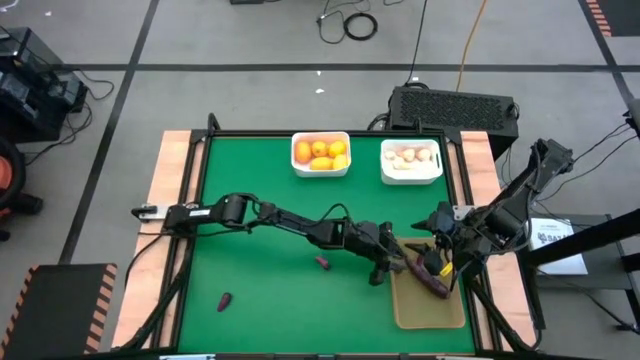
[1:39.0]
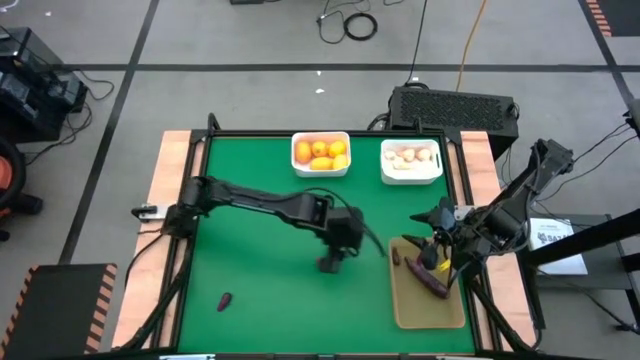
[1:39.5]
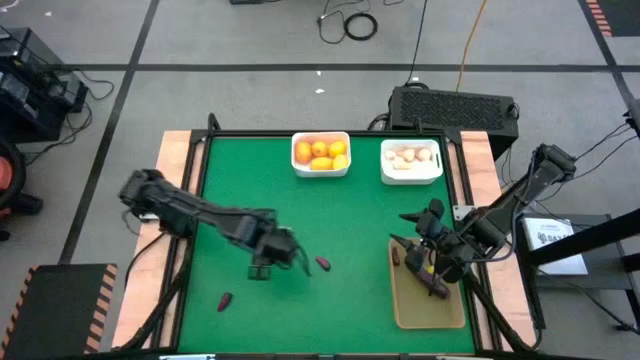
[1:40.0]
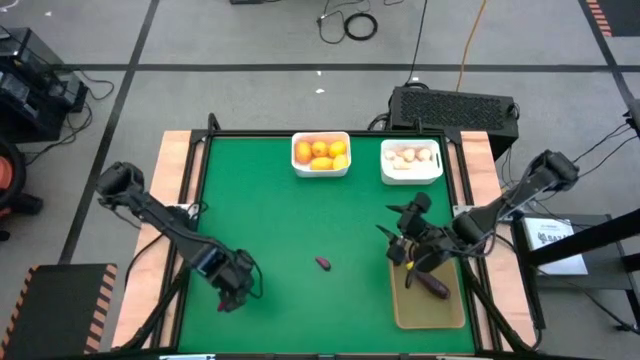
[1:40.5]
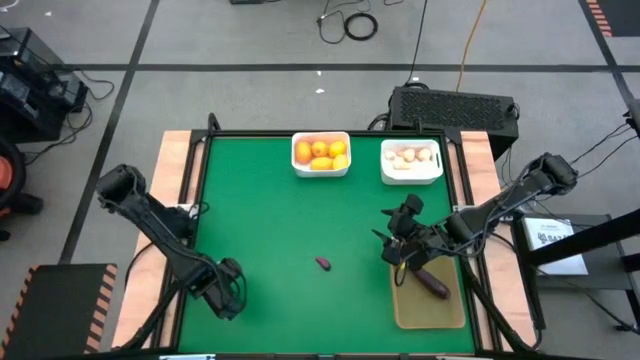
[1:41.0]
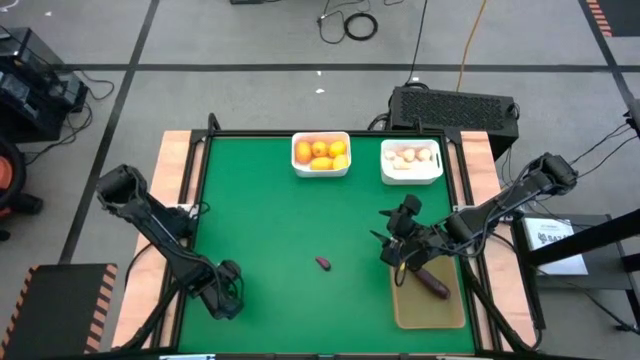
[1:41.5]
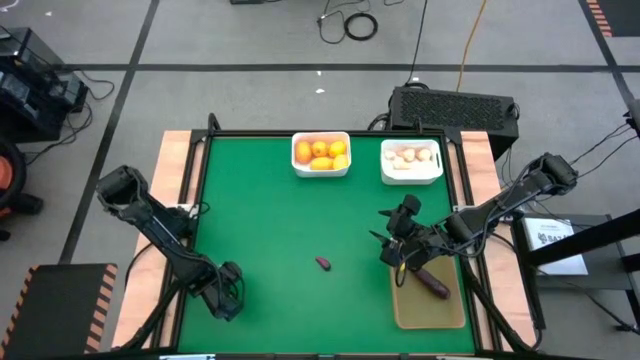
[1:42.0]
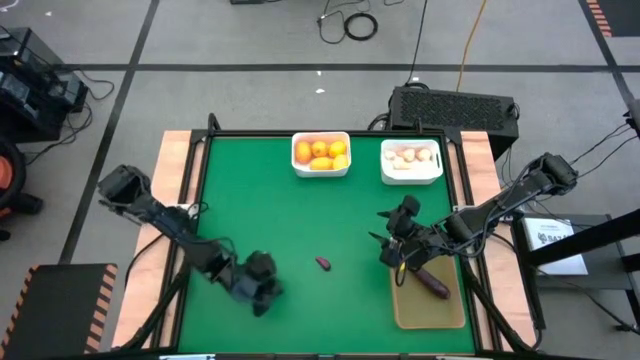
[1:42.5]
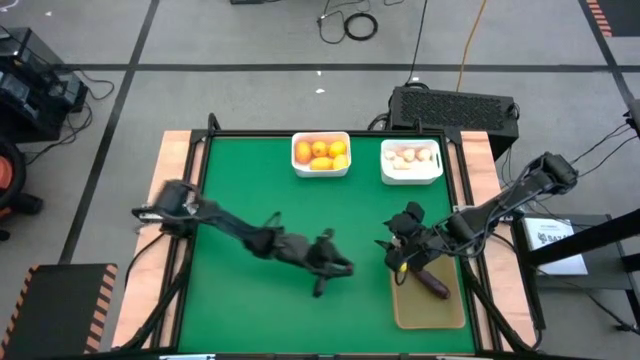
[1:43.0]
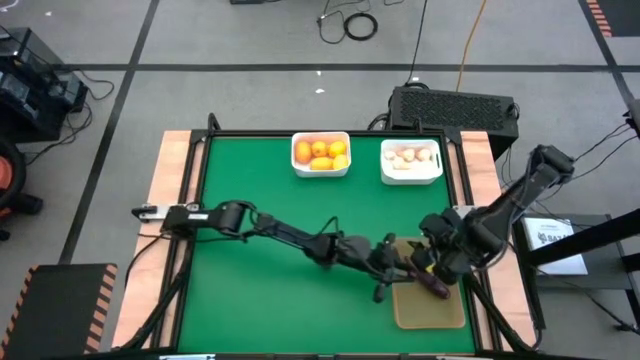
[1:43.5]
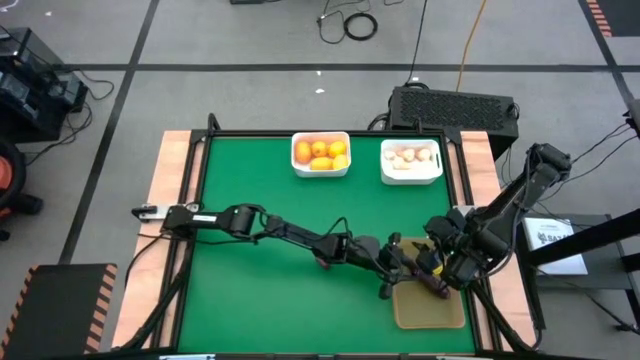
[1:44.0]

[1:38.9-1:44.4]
Task: Sort produce into baskets
Put the purple eggplant into the light orange bin

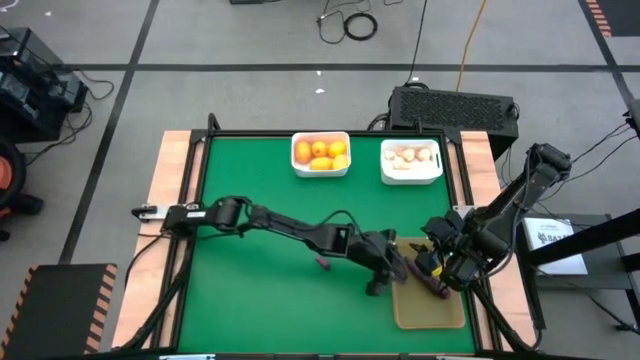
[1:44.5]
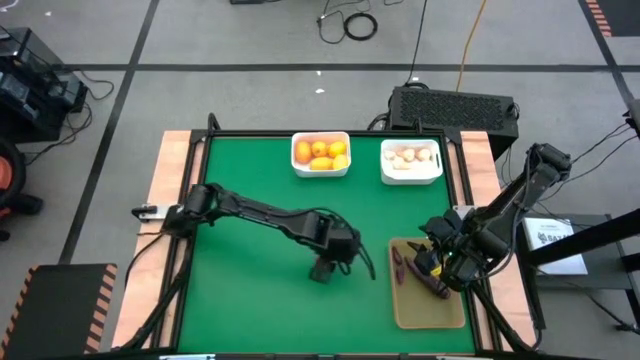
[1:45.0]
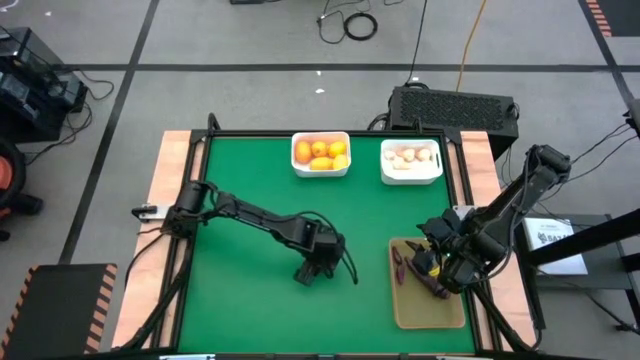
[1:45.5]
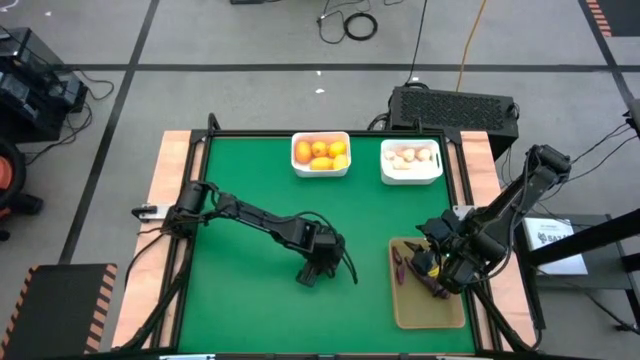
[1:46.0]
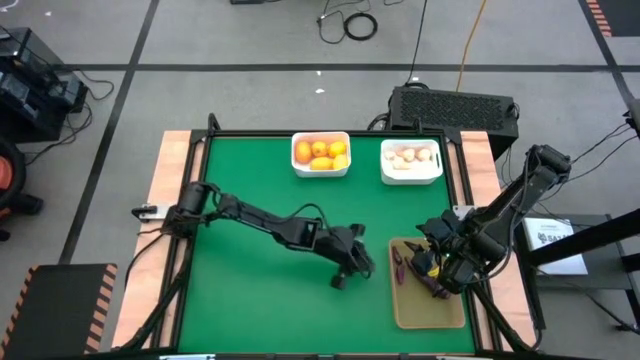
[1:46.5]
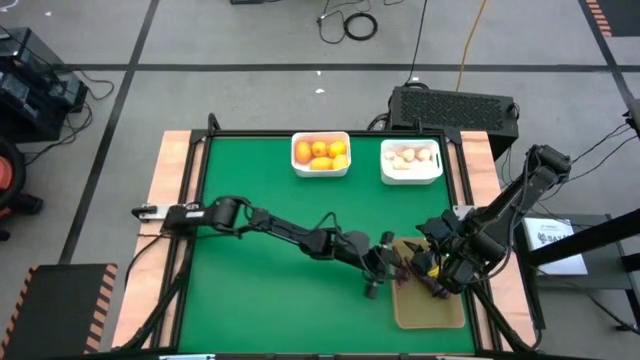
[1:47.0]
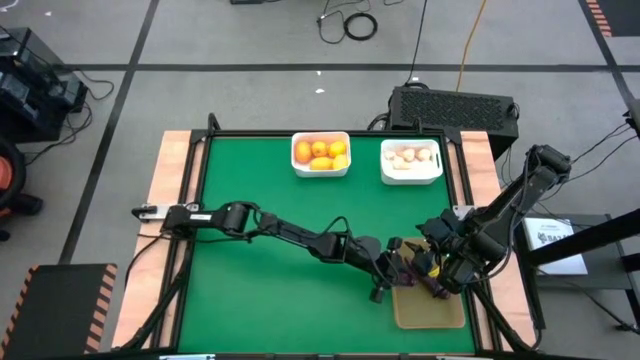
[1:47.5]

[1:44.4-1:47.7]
Put the eggplant into the light orange bin

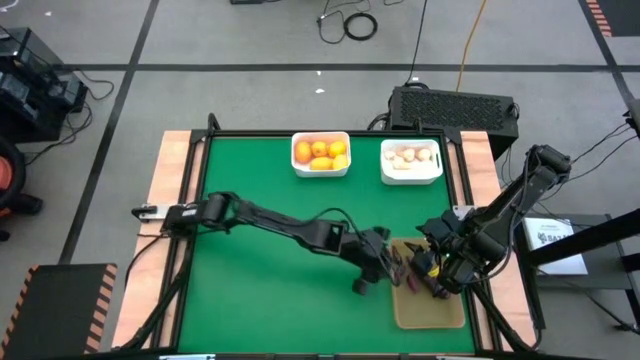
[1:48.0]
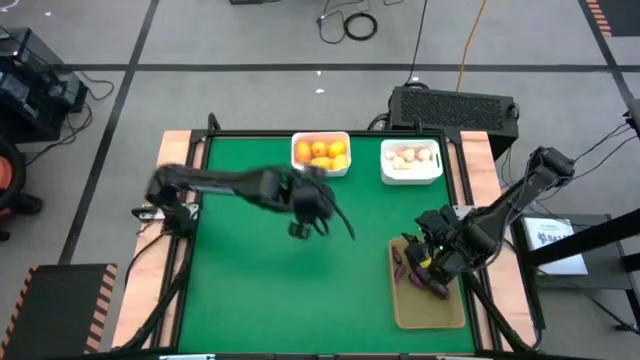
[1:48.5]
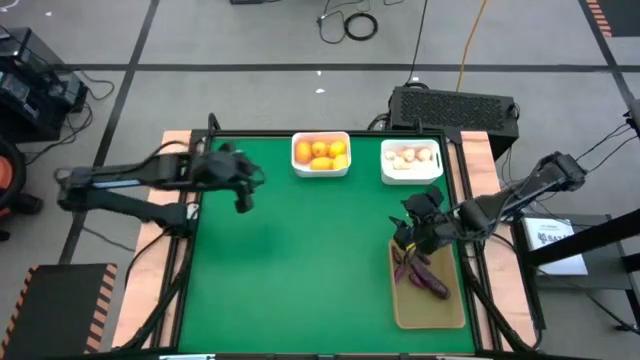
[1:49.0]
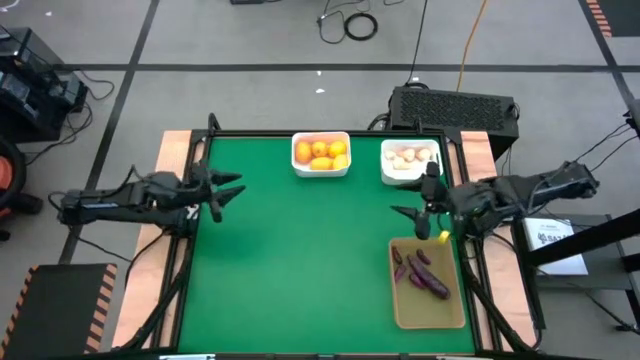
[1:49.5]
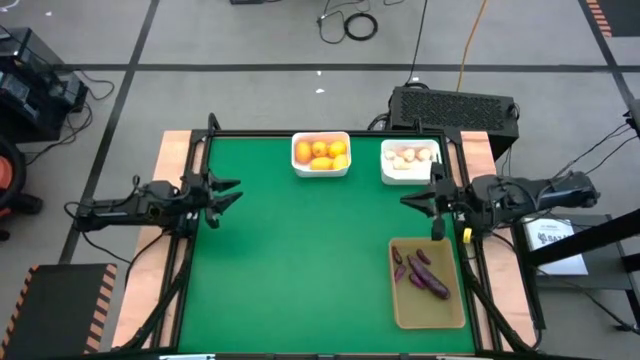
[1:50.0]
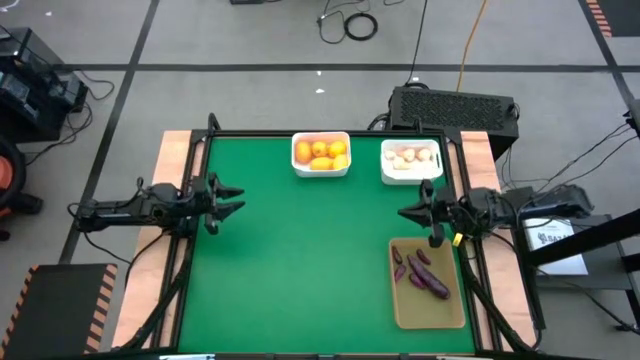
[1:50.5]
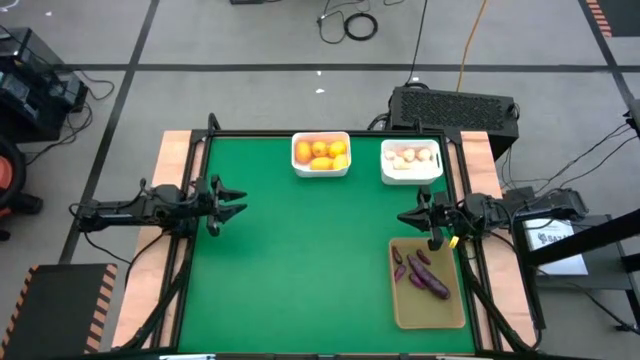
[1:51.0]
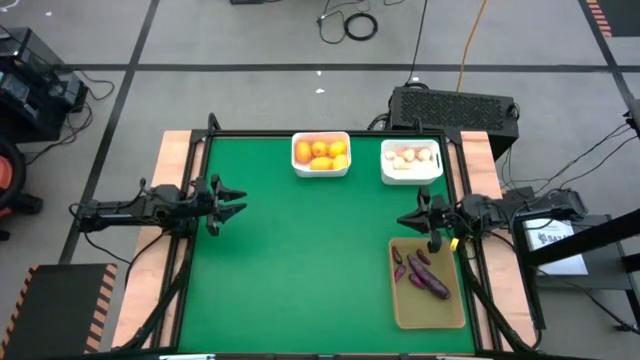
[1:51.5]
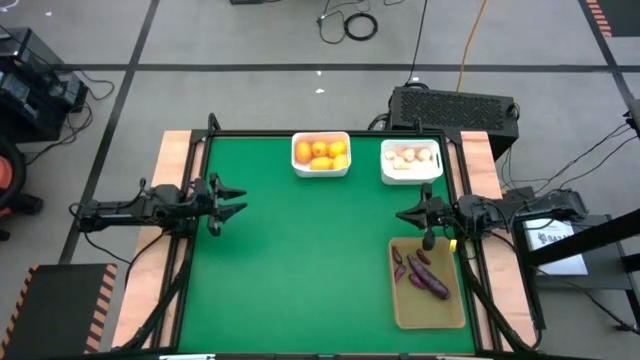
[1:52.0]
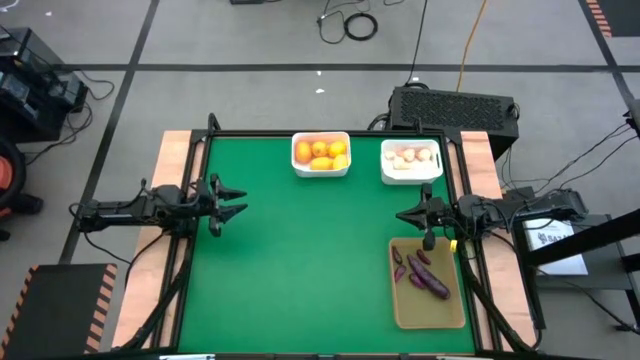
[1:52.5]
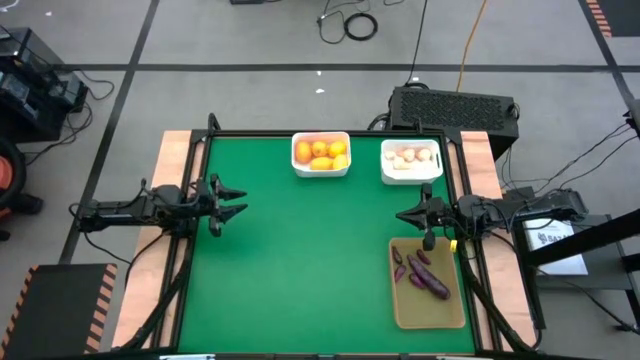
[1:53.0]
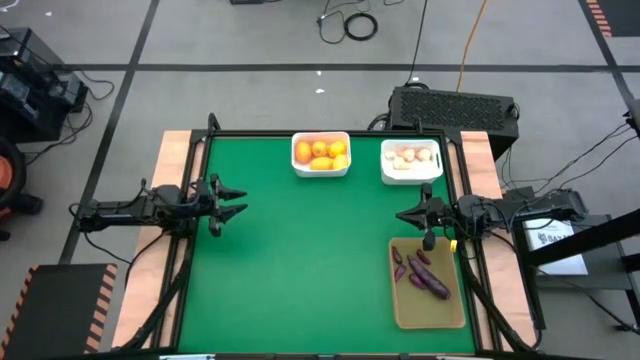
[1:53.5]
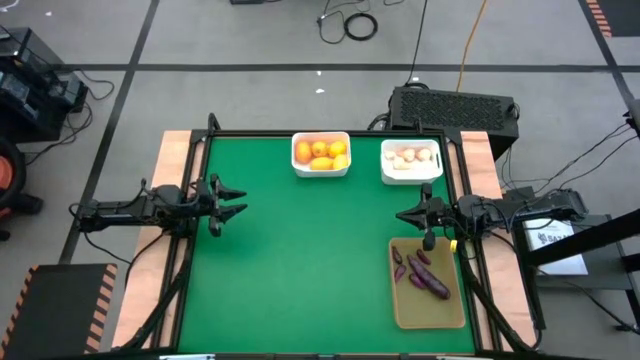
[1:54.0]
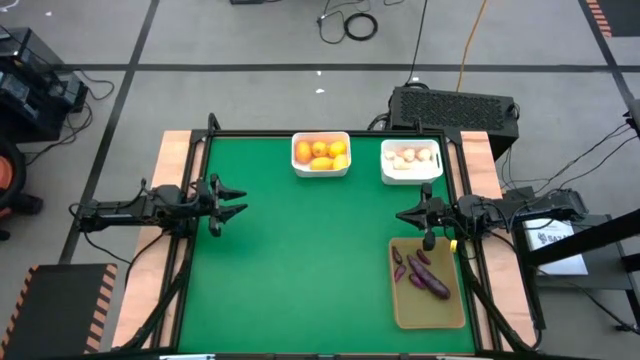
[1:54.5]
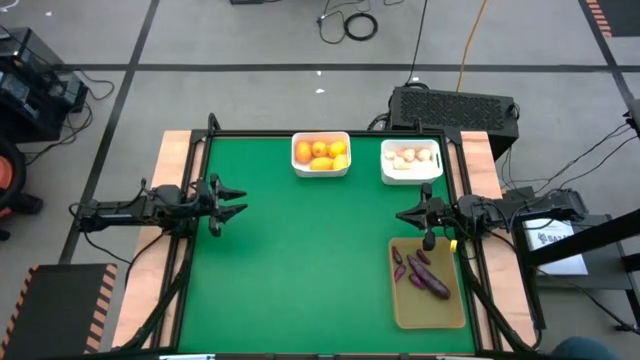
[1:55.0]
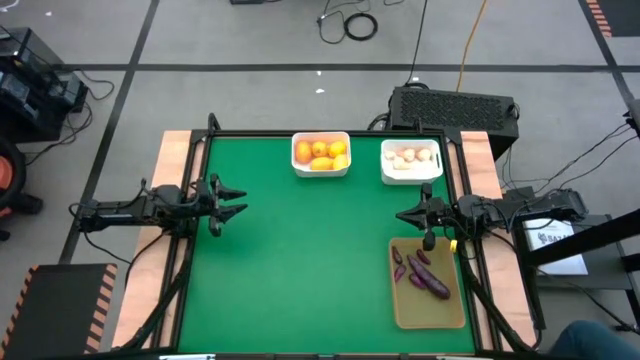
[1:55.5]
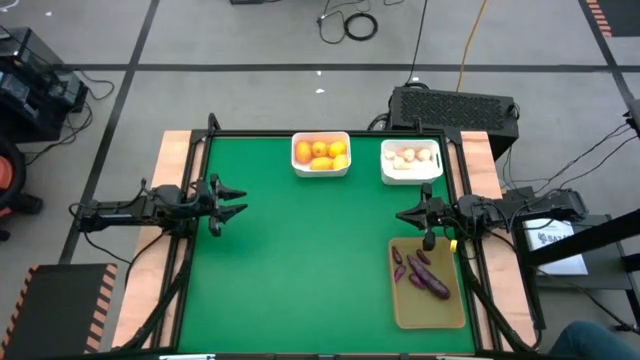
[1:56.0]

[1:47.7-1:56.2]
Return to Home Position

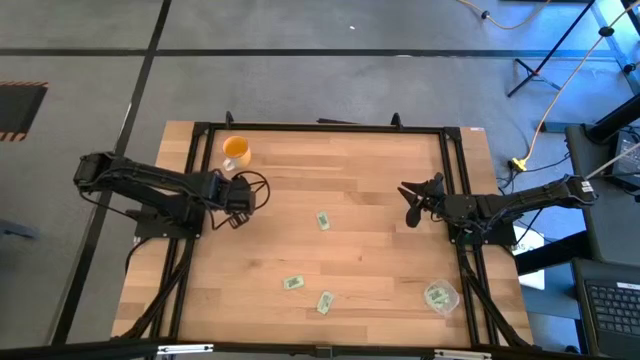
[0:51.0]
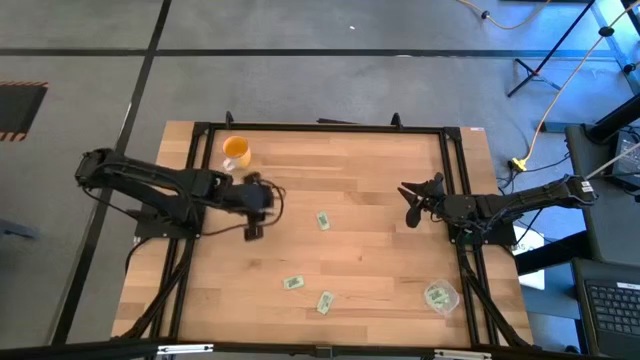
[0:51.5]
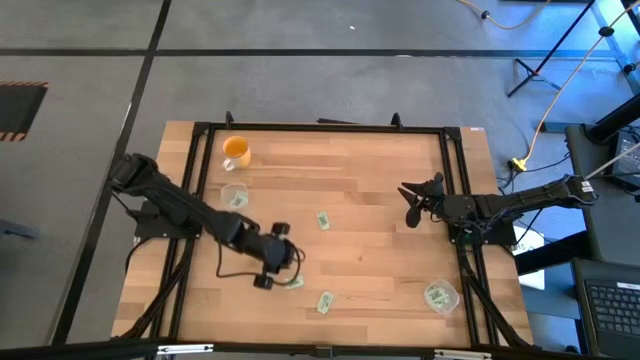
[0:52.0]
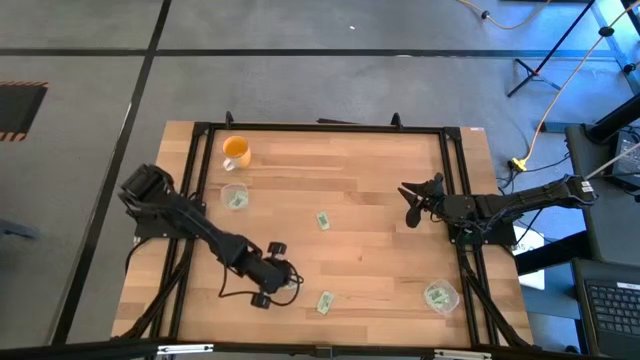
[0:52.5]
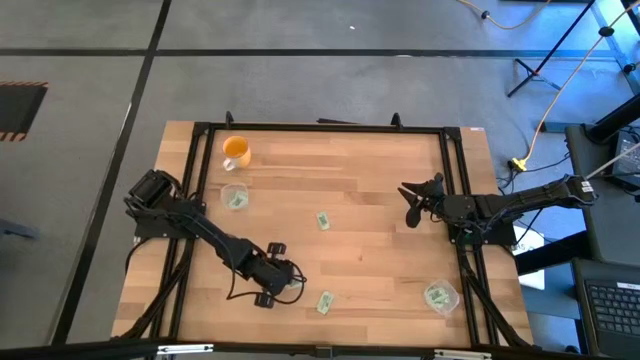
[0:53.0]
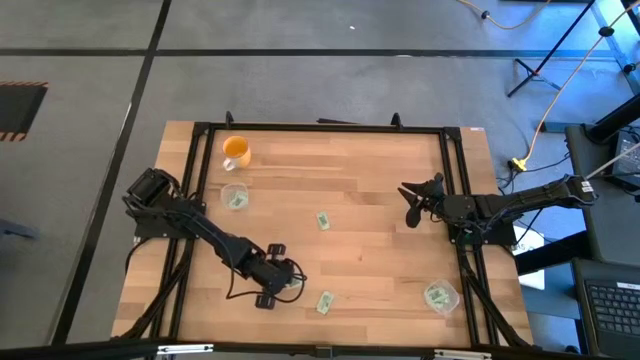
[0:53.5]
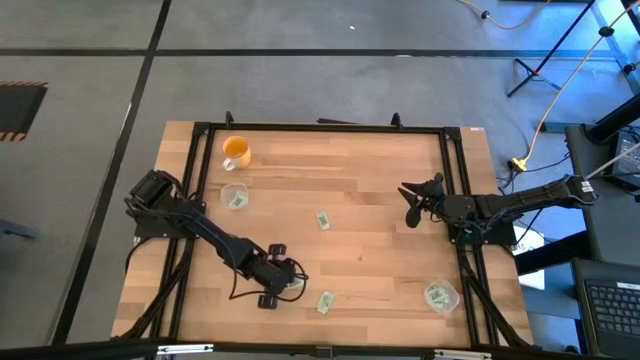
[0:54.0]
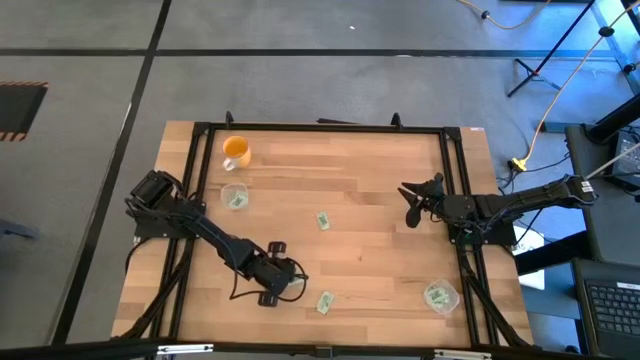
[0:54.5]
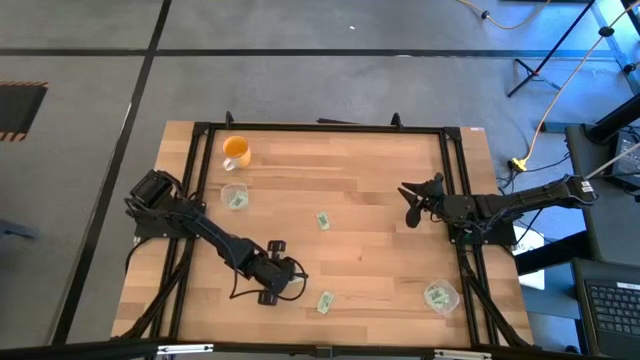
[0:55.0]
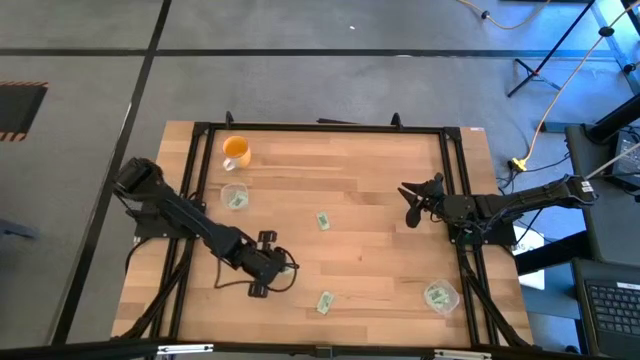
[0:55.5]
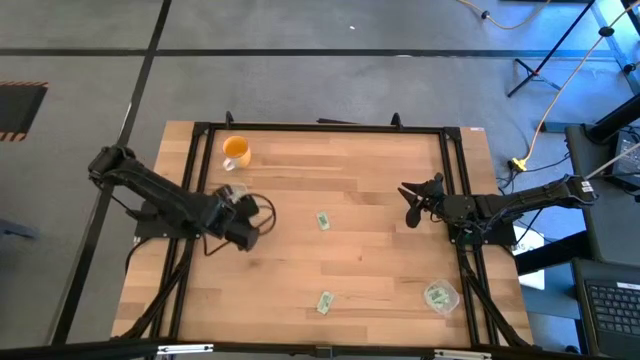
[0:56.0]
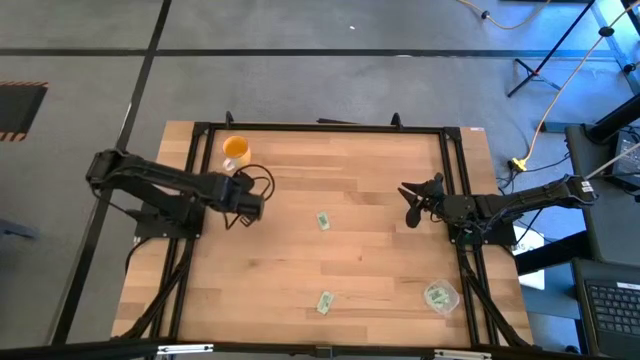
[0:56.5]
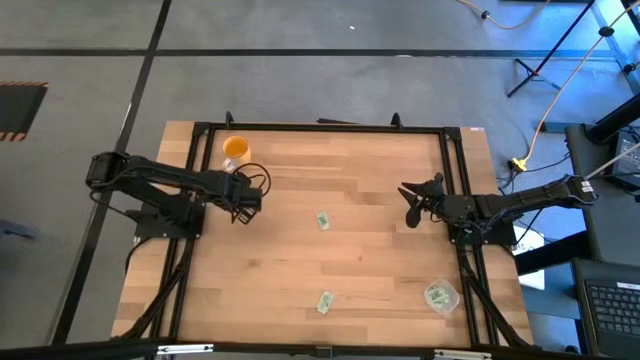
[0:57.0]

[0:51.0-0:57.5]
Task: Pick and place items into bin
Put the green stevia packet into the top transparent bin
